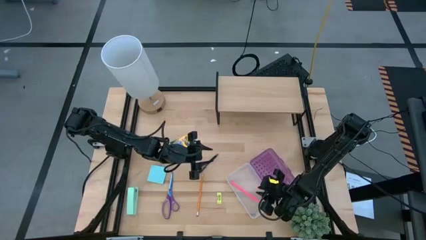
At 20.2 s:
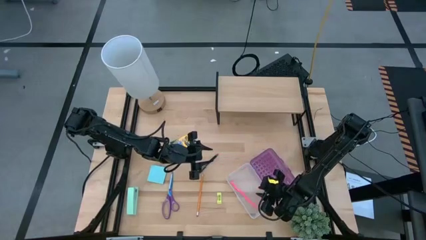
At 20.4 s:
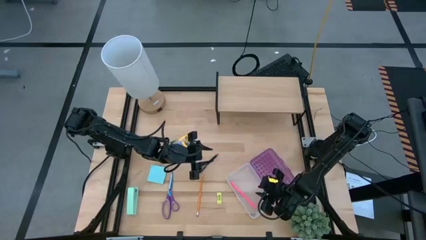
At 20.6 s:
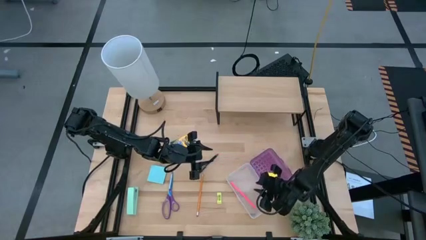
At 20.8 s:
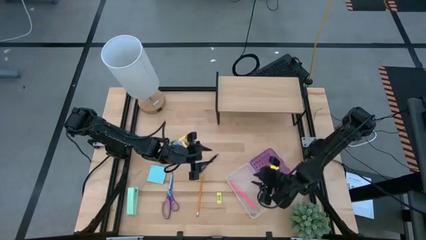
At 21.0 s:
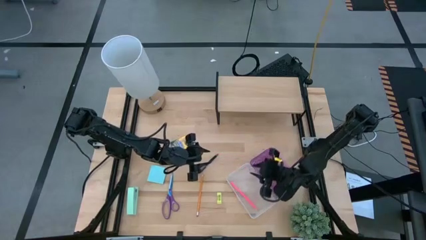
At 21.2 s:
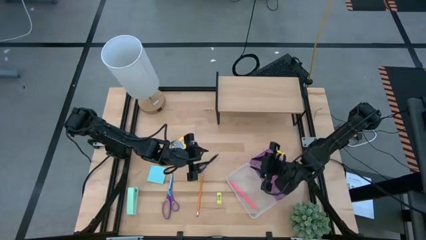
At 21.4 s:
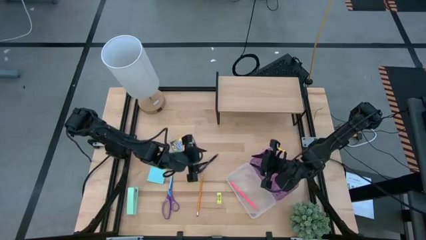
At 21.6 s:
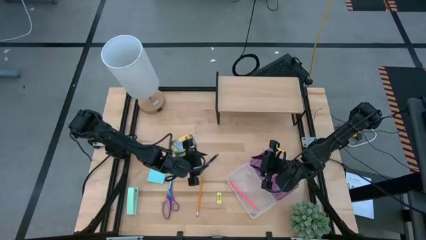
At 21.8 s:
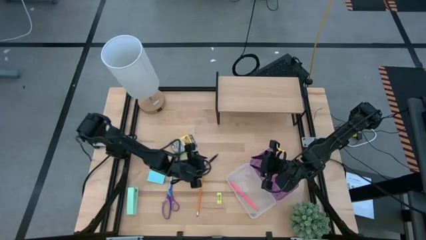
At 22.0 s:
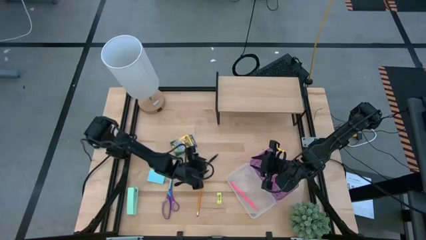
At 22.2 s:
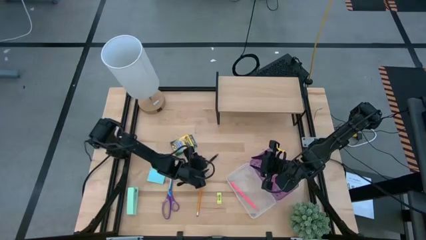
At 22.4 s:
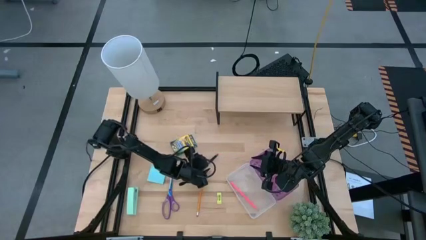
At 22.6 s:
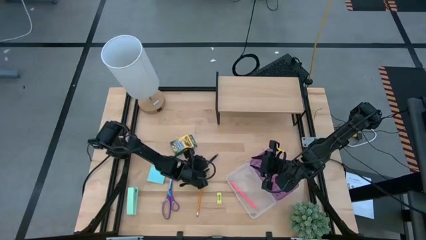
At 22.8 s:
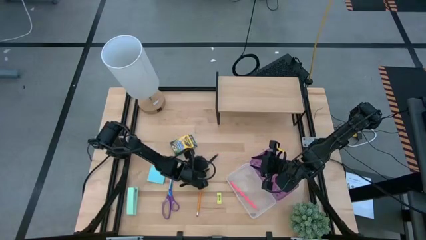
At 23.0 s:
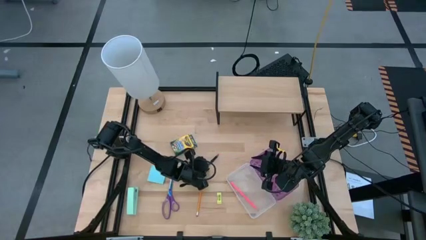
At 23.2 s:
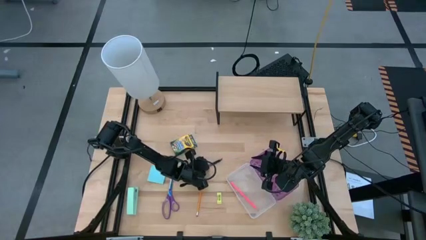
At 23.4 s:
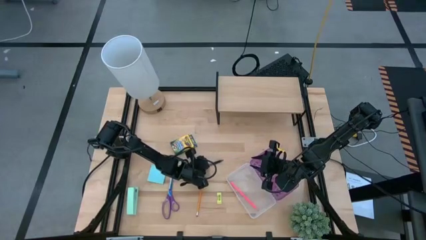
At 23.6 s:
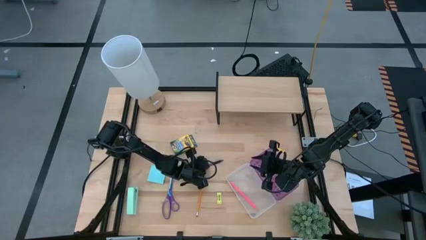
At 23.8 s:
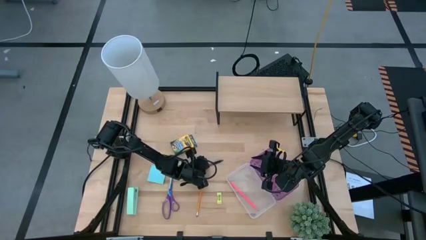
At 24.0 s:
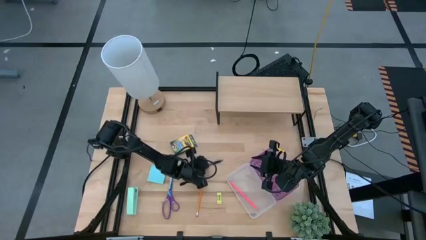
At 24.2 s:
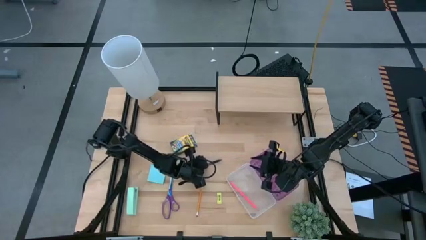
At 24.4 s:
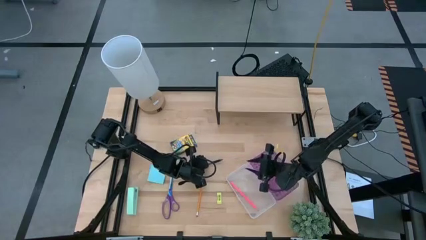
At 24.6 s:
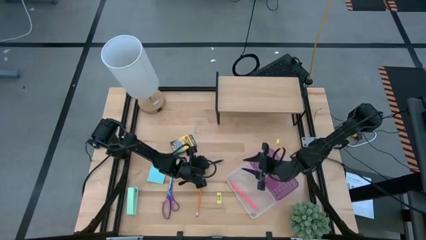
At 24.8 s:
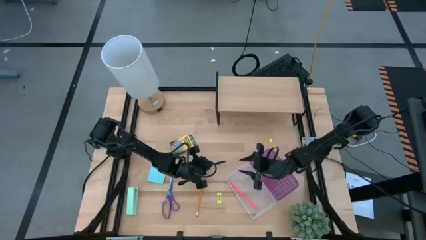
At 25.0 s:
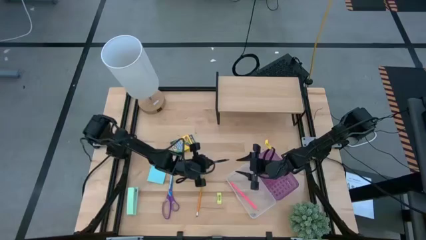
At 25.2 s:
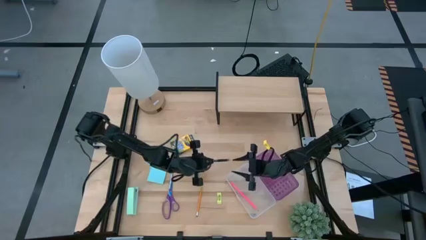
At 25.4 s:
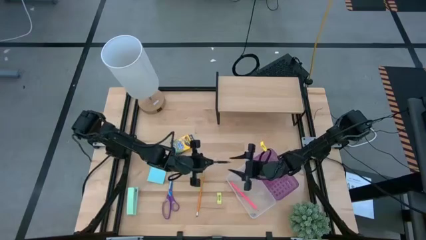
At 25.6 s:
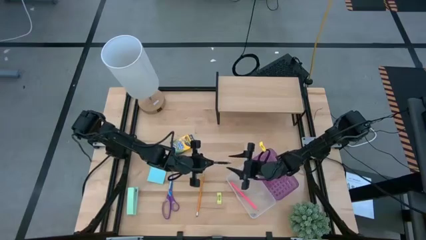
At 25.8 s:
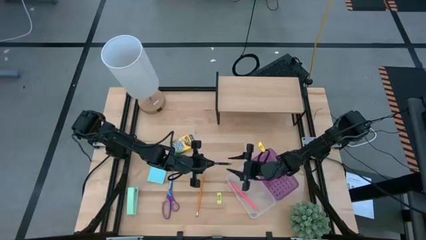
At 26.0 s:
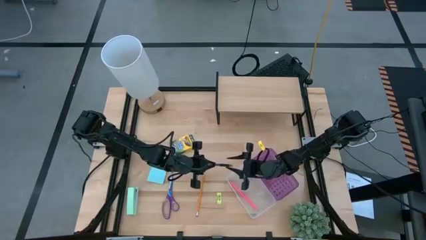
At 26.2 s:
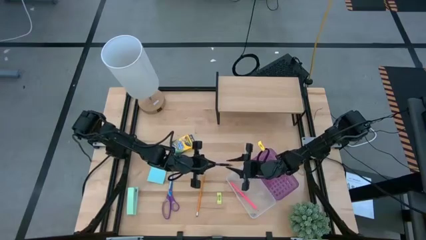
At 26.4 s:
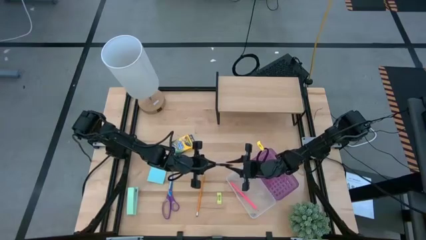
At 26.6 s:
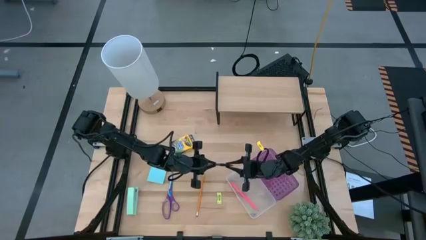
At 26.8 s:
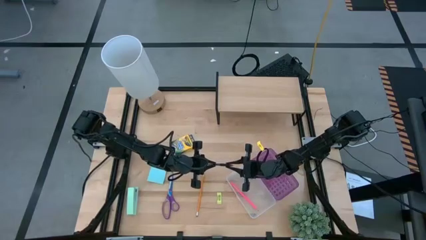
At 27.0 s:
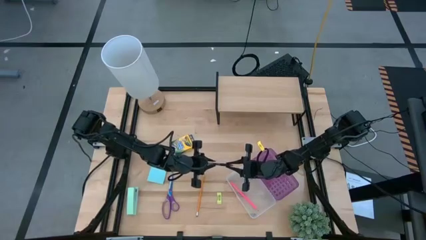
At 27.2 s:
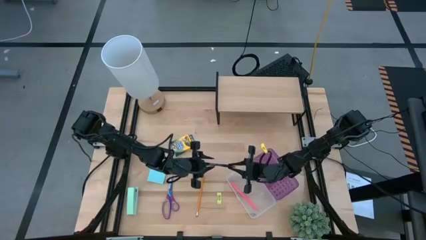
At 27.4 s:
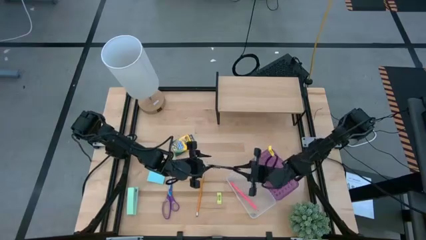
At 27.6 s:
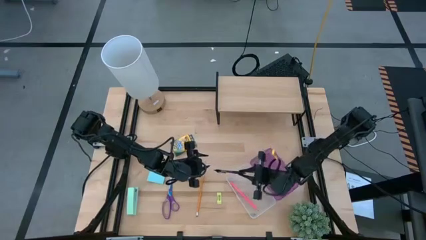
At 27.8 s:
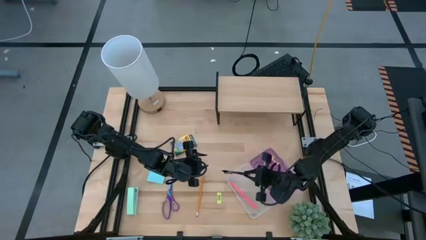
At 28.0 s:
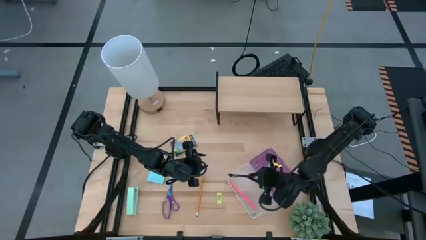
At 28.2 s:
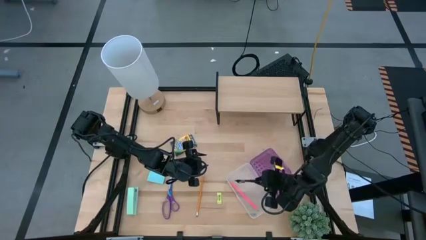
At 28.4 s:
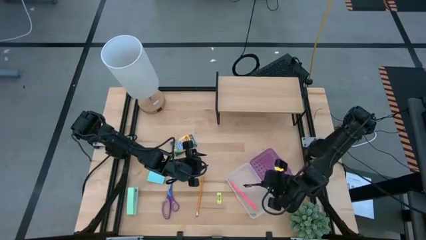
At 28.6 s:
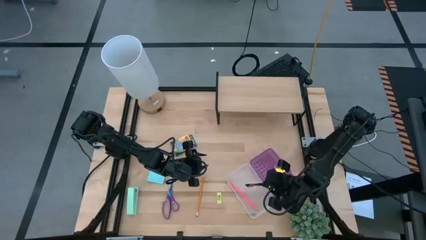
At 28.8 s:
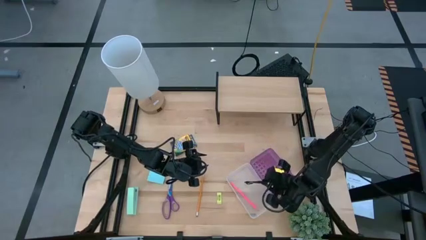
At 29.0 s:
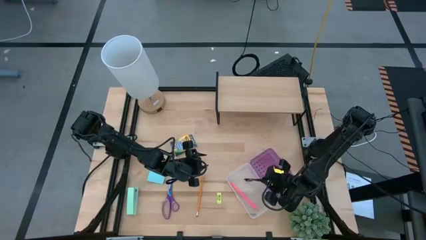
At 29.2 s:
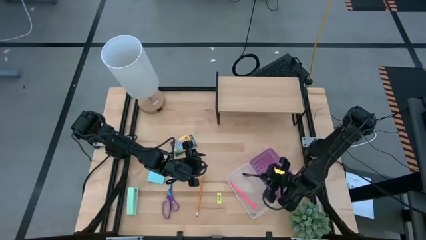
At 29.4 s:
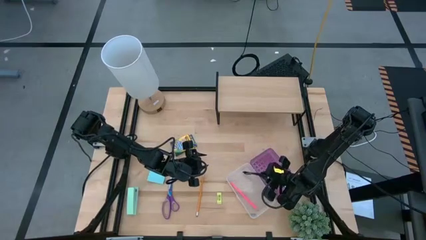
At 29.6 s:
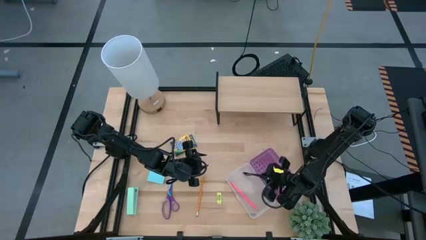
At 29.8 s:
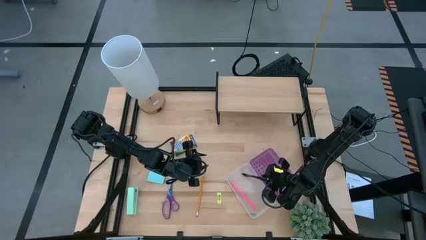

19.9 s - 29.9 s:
Task: Pack school essentials
Put the black pen into the purple supply box
